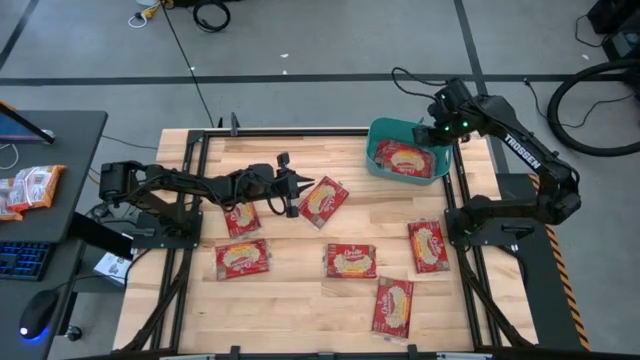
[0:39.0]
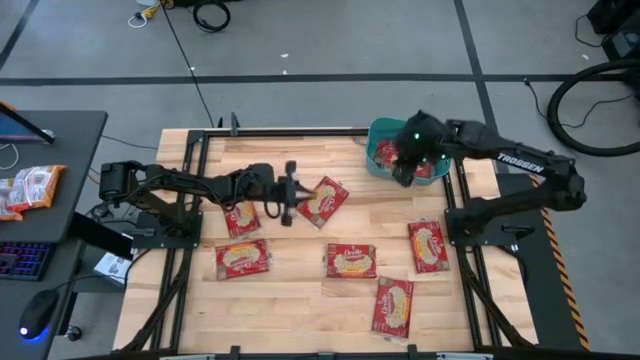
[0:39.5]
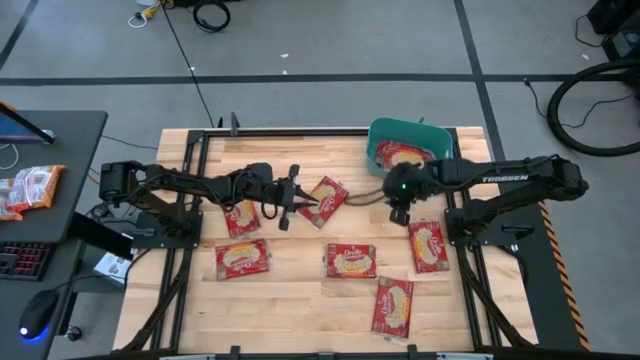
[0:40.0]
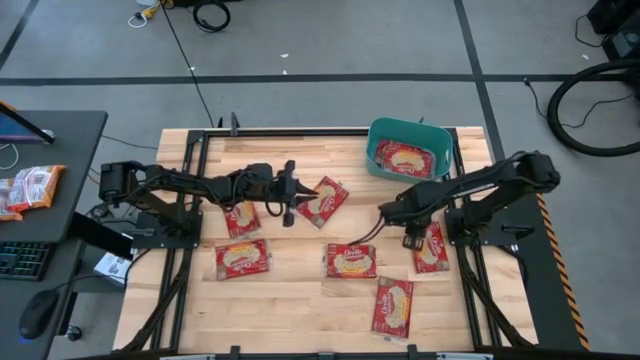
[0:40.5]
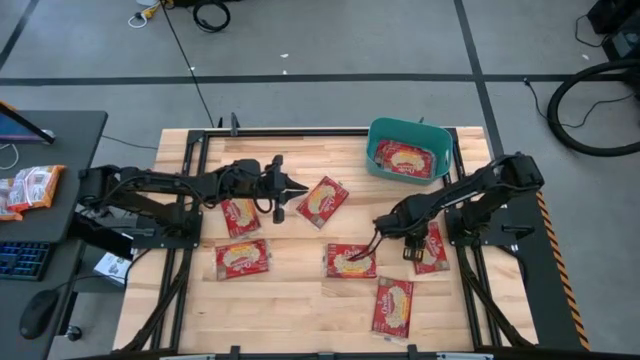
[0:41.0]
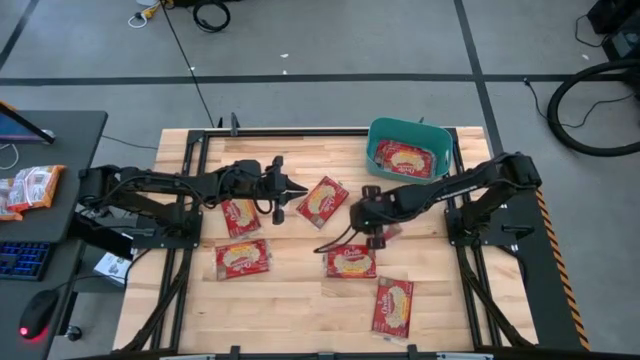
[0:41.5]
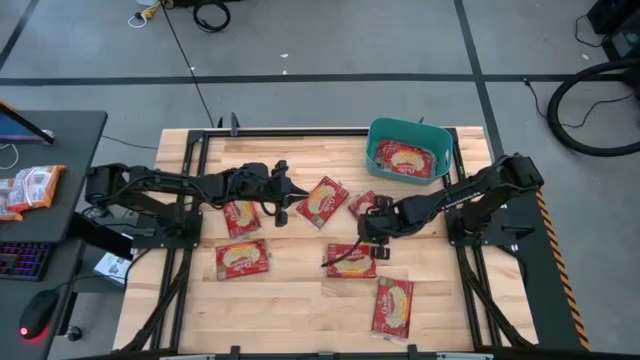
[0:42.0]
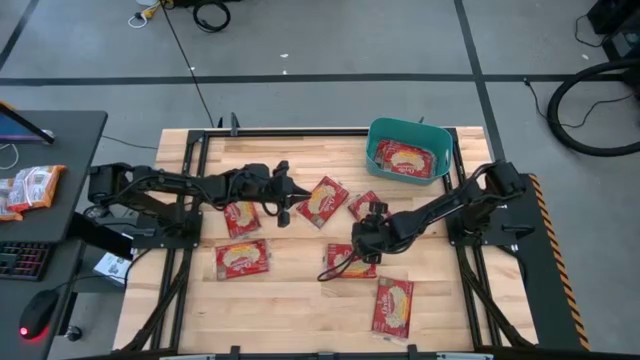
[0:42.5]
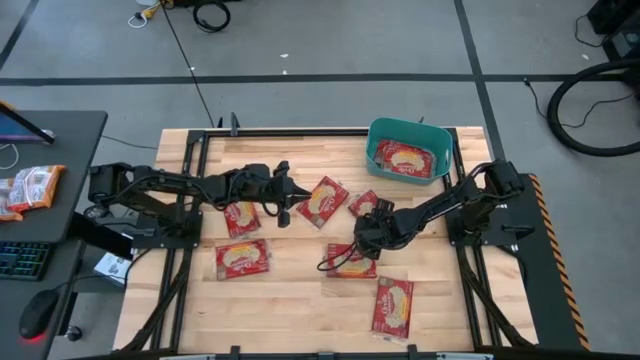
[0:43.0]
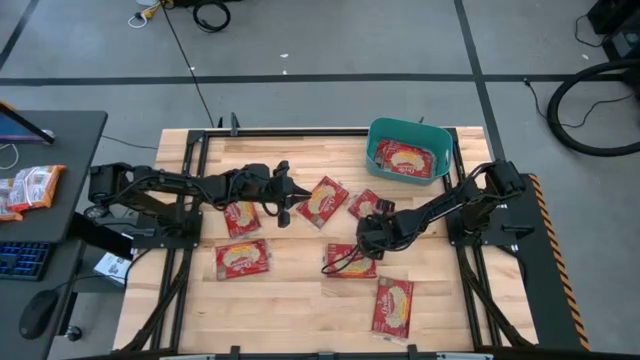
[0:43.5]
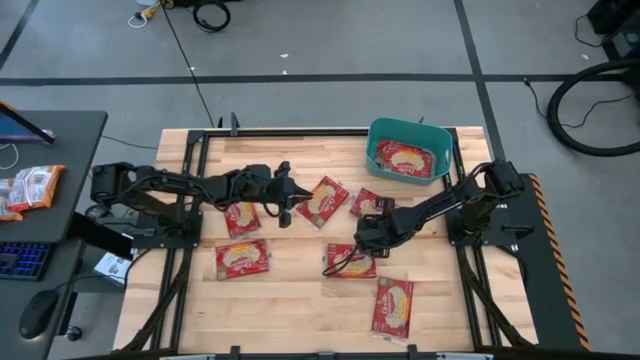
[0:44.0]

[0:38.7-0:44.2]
Task: Sort popcorn bags into baskets
Put the popcorn bag into the blue bin

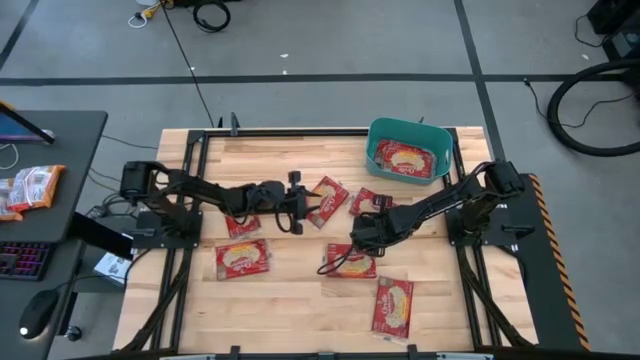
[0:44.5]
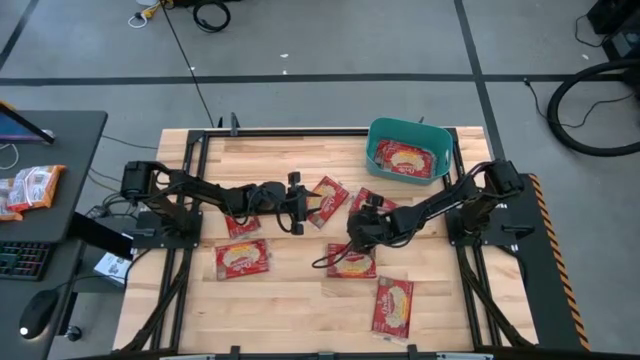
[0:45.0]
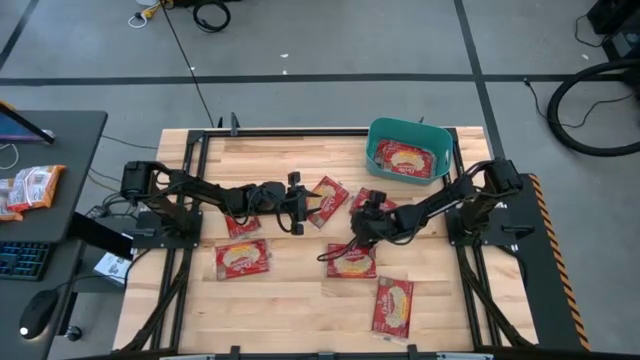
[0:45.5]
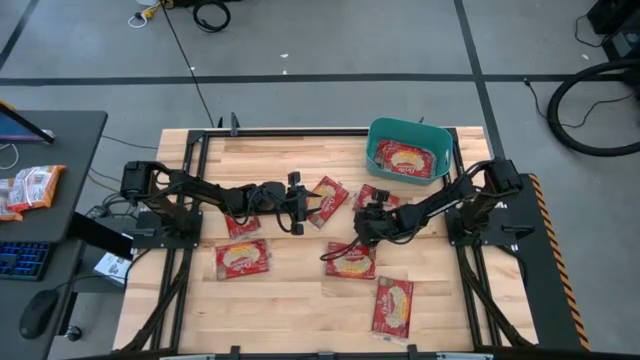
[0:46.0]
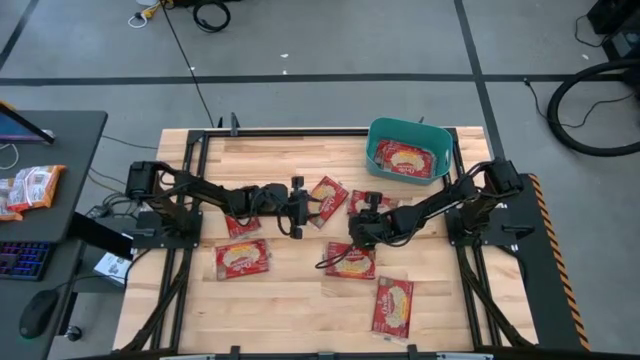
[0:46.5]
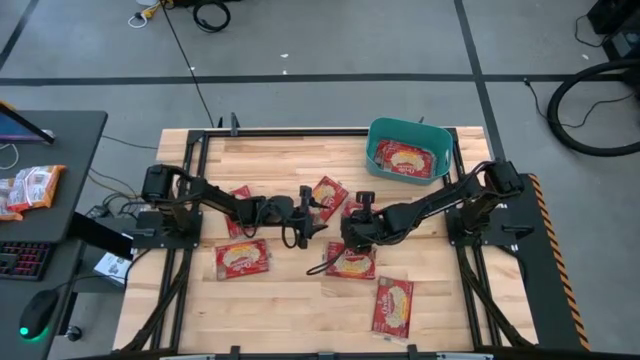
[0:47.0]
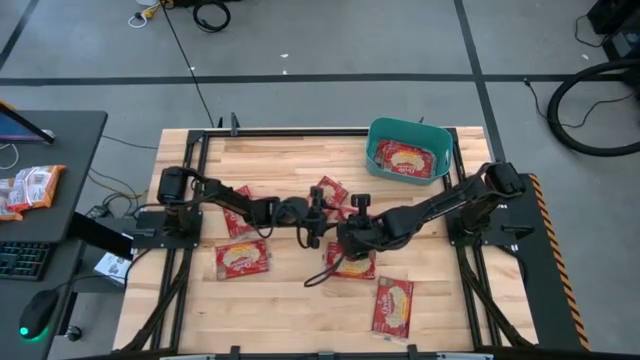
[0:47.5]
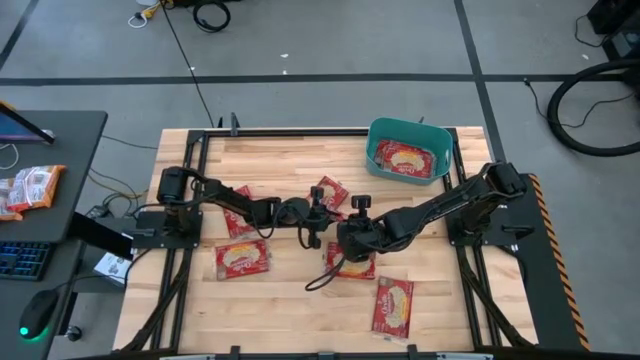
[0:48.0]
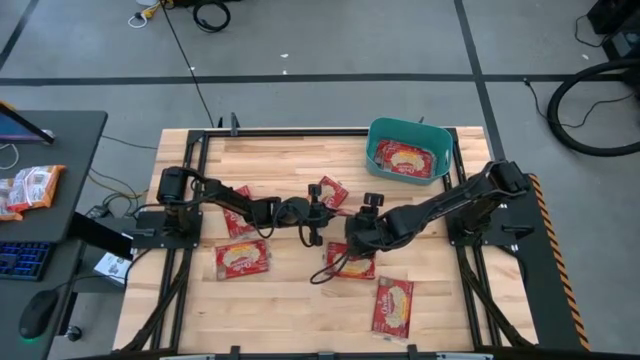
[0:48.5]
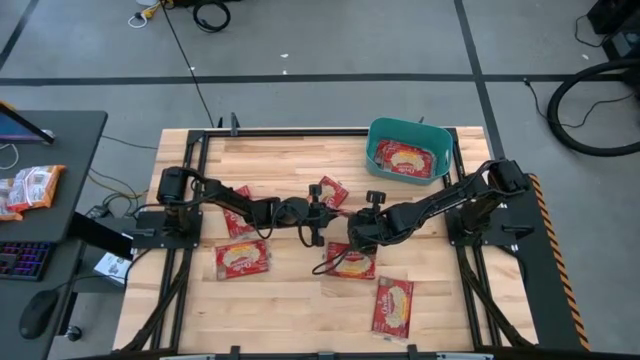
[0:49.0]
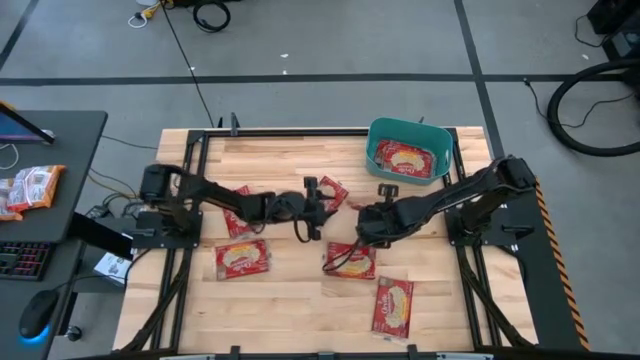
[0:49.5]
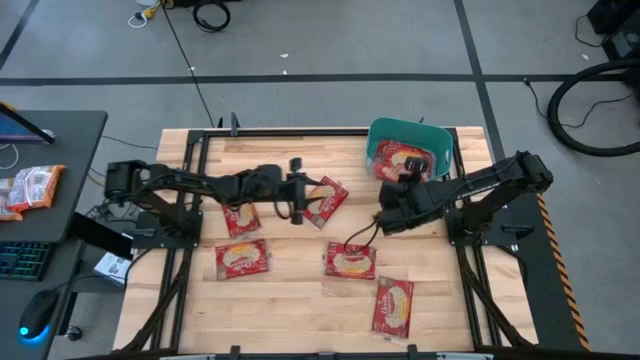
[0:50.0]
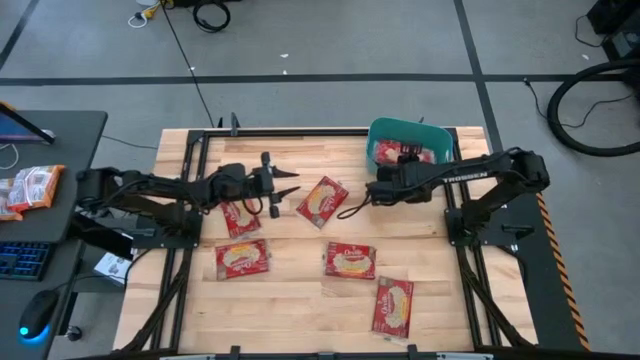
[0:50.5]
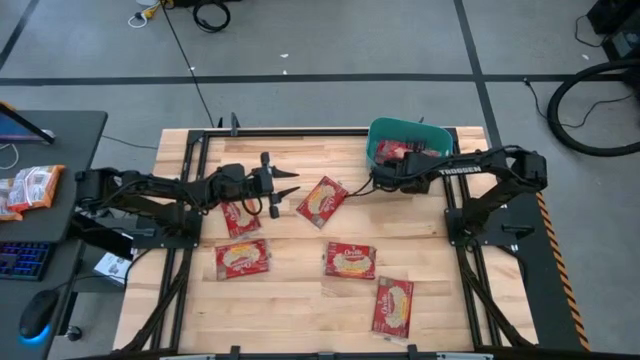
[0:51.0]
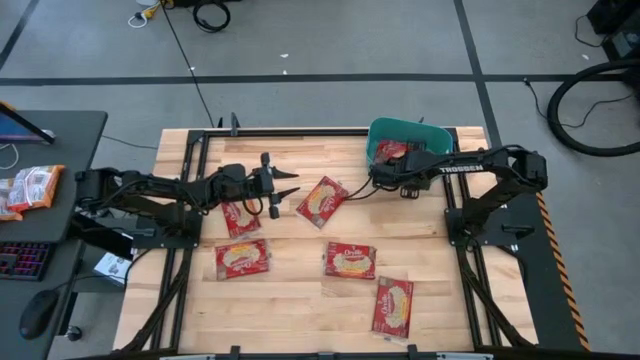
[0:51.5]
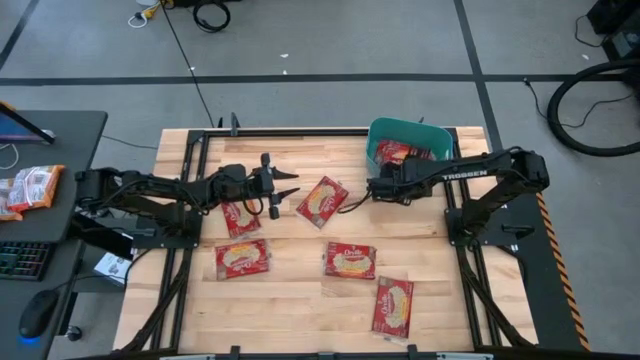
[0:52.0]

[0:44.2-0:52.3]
Put the popcorn bag into the blue bin

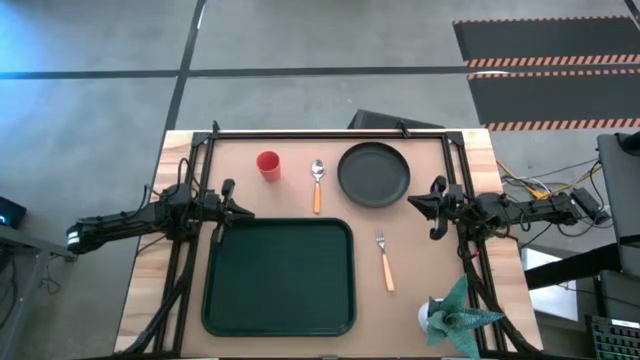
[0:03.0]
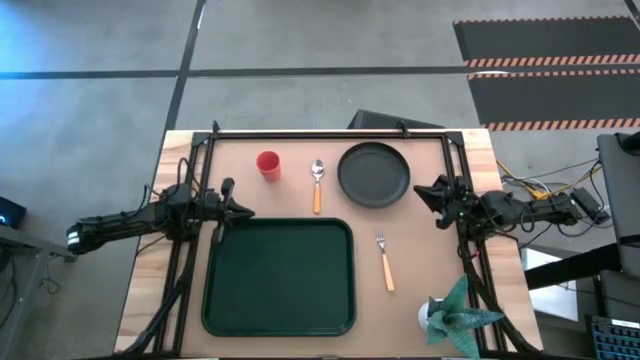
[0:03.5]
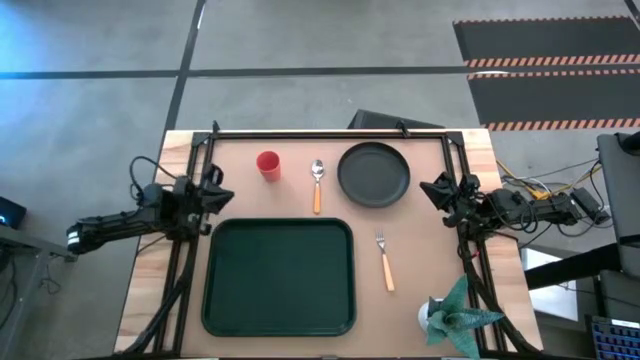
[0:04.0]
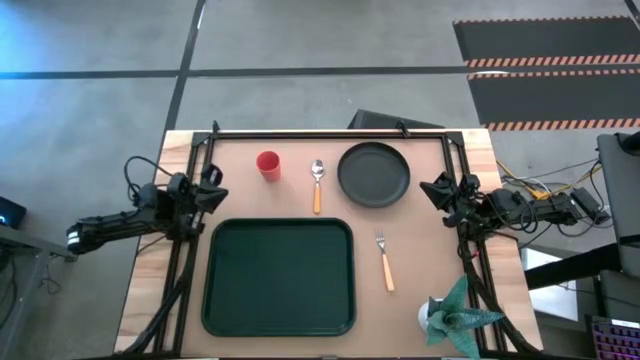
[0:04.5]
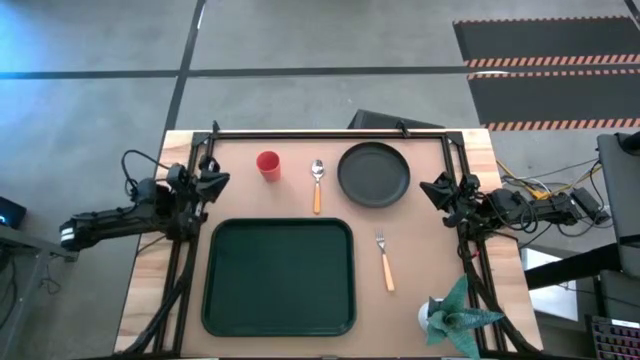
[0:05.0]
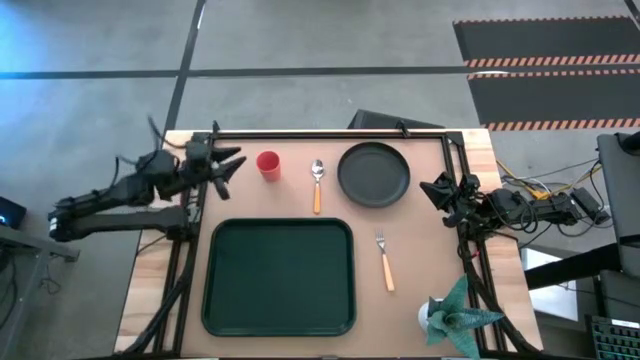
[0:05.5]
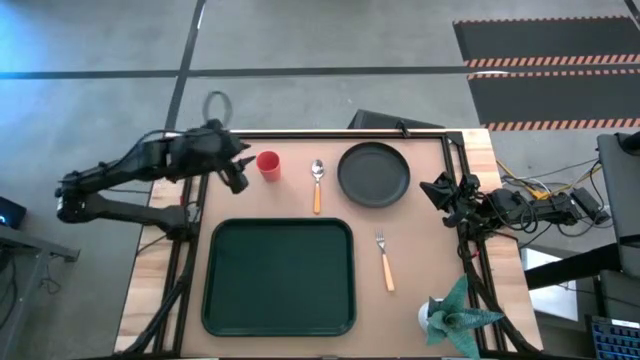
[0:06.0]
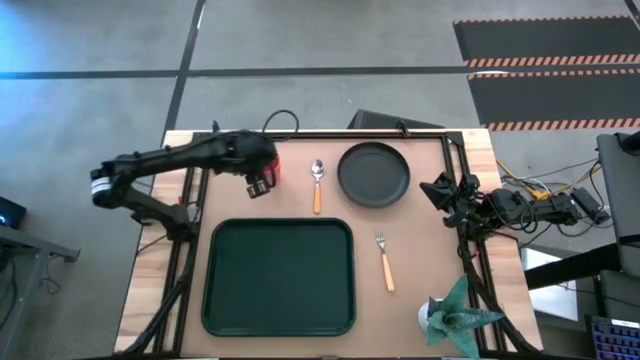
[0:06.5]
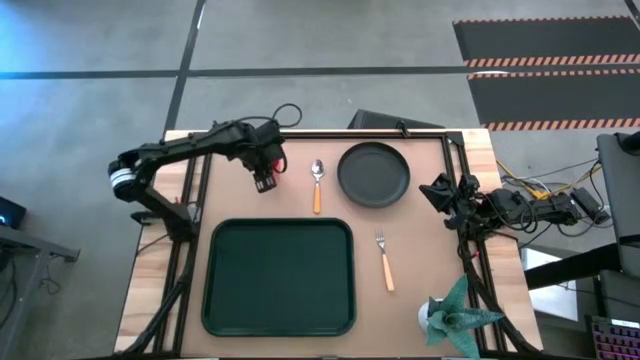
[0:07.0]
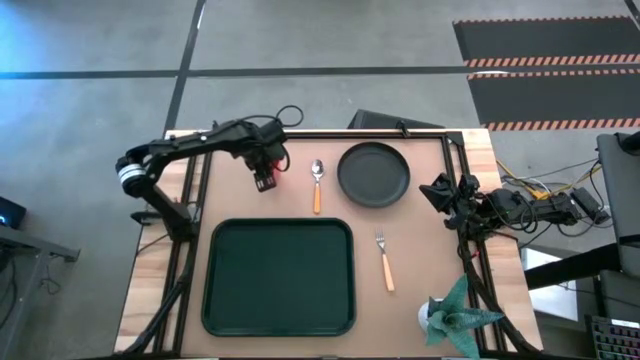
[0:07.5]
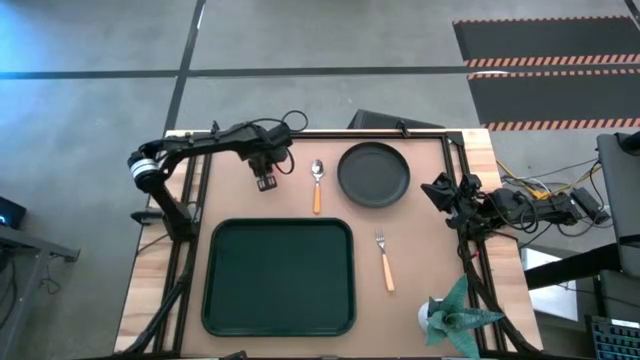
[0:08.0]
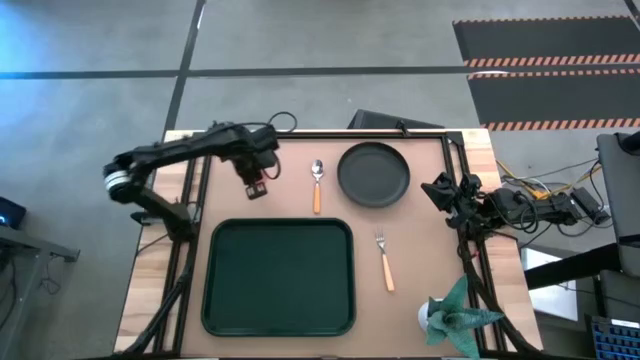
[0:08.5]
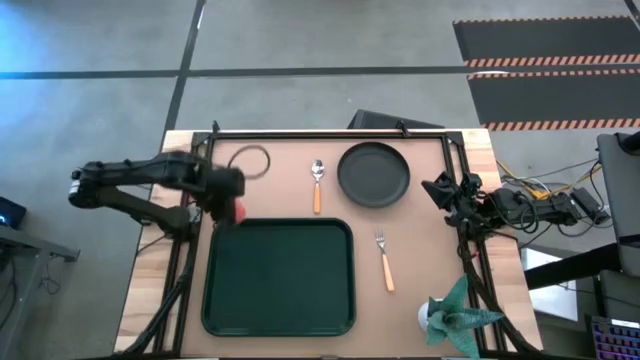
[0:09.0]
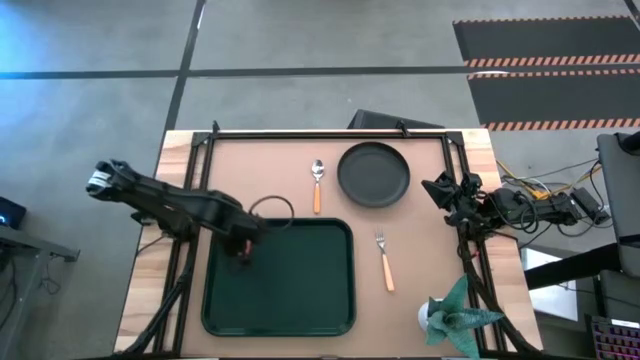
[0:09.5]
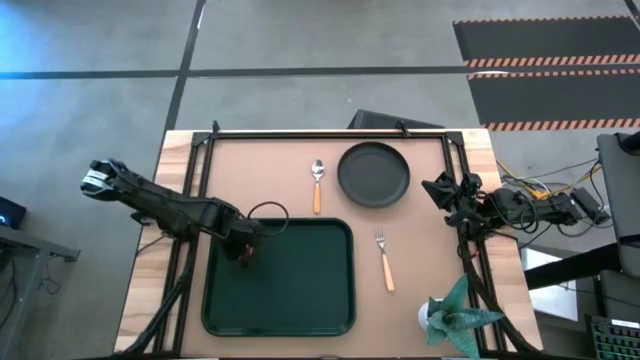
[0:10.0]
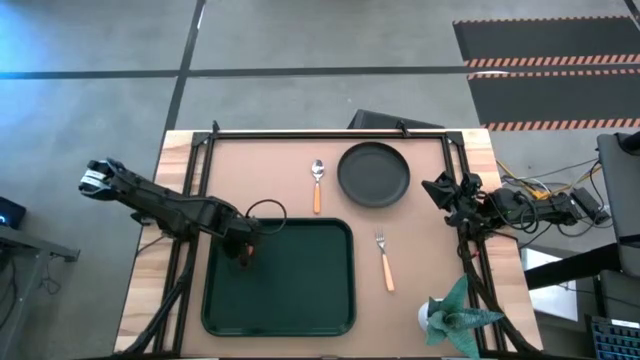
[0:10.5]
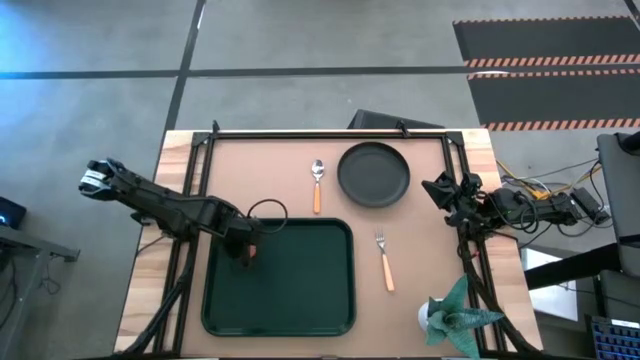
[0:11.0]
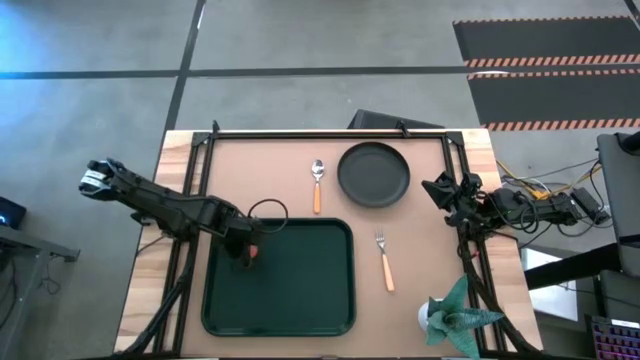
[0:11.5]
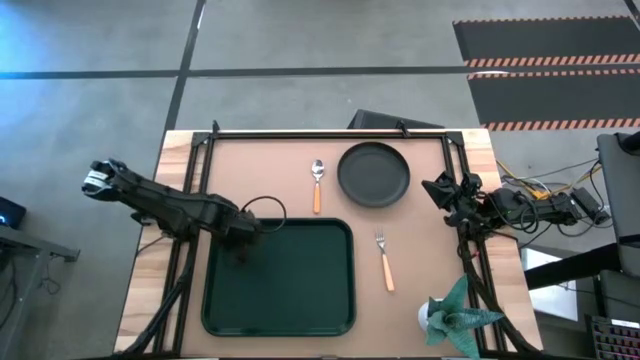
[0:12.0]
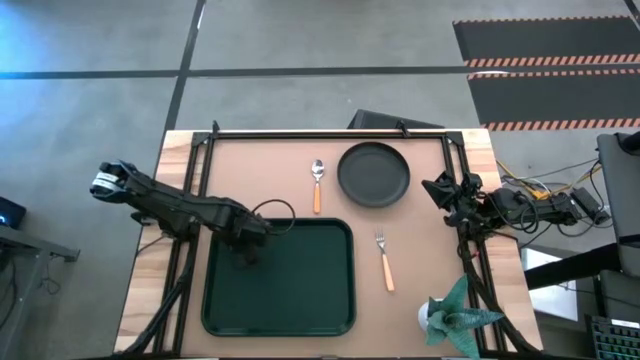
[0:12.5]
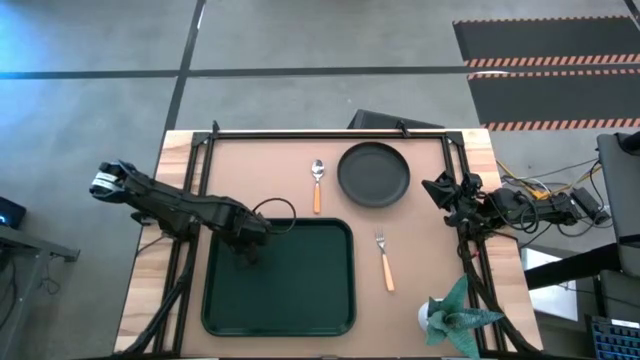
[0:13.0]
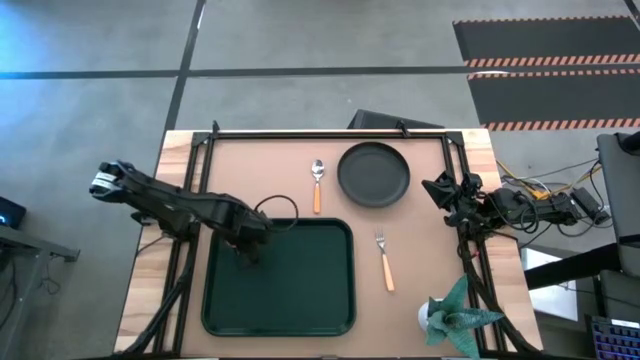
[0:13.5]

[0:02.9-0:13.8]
Task: Pick and place plate/cup/fork/spoon on tray
Put the orange cup on the green table tray
